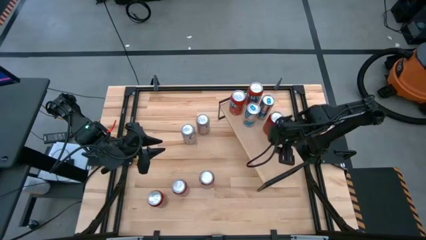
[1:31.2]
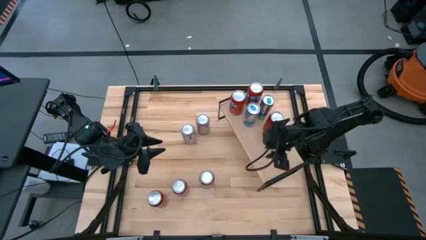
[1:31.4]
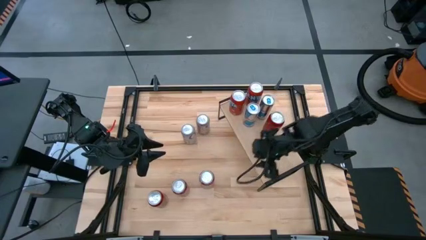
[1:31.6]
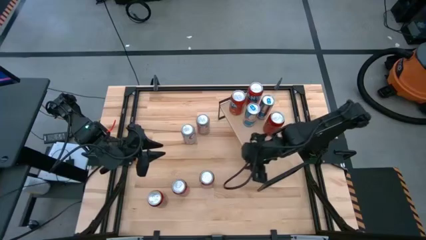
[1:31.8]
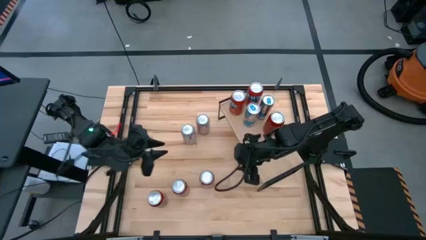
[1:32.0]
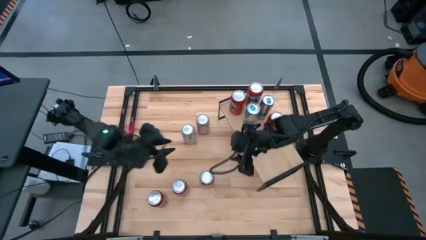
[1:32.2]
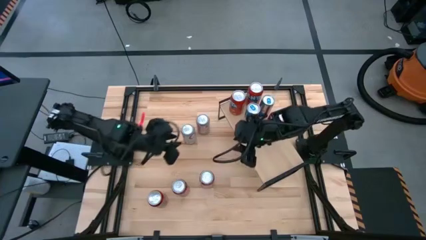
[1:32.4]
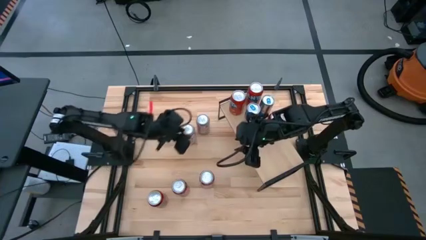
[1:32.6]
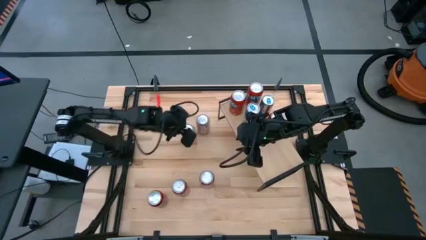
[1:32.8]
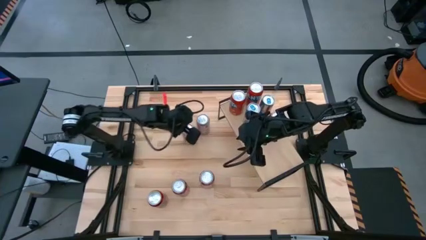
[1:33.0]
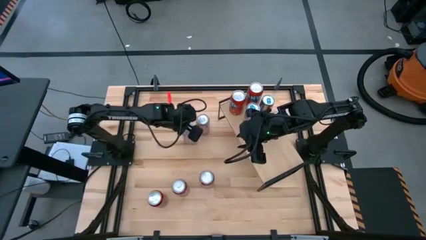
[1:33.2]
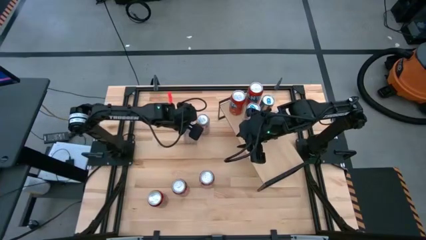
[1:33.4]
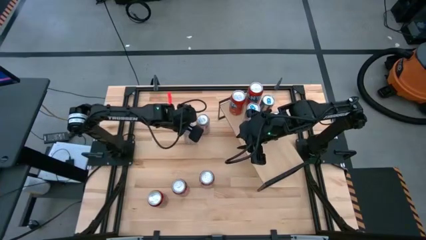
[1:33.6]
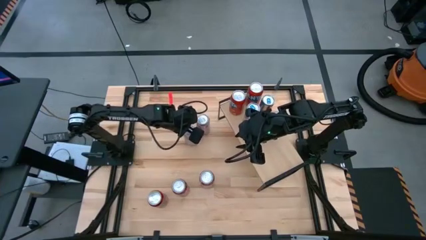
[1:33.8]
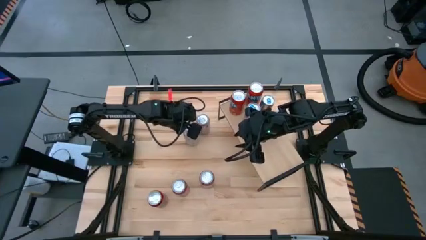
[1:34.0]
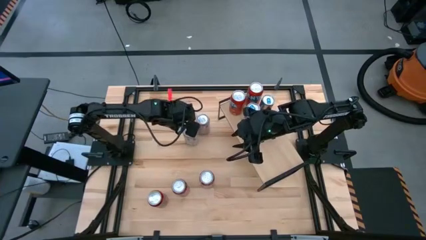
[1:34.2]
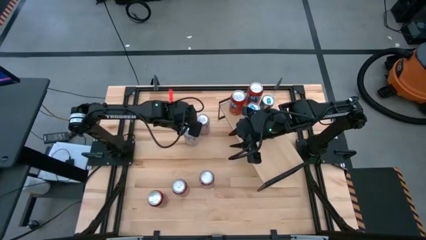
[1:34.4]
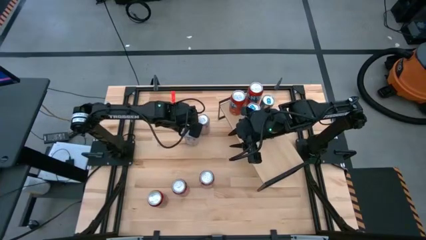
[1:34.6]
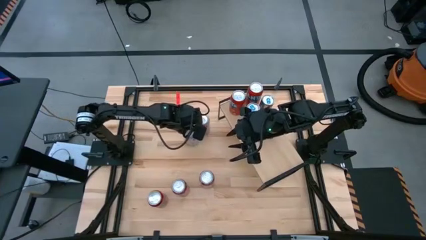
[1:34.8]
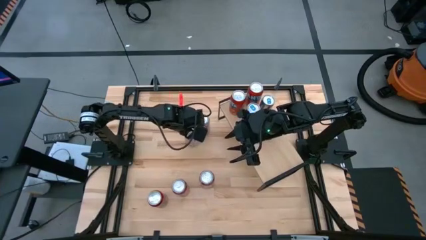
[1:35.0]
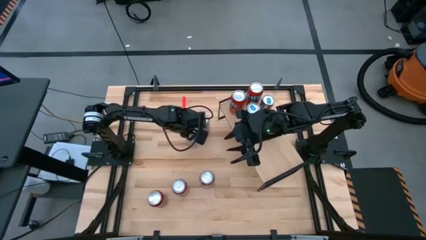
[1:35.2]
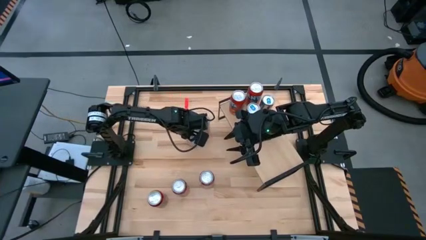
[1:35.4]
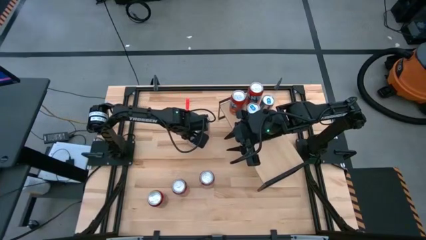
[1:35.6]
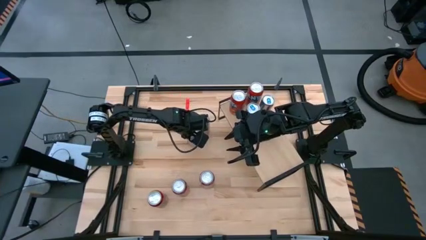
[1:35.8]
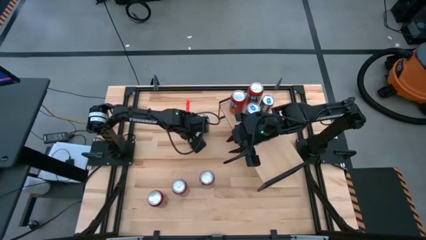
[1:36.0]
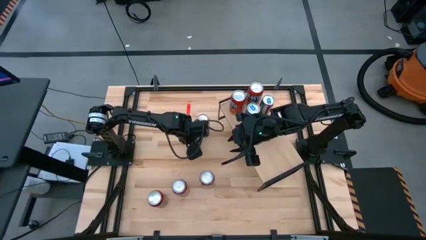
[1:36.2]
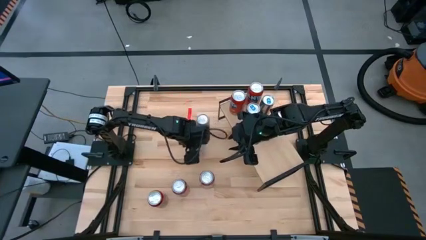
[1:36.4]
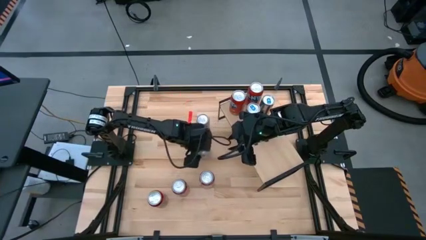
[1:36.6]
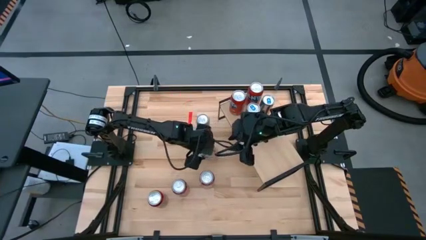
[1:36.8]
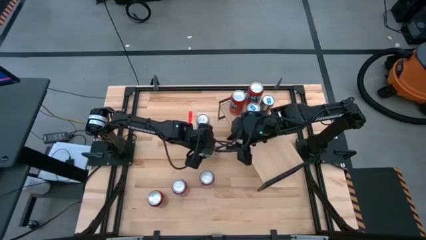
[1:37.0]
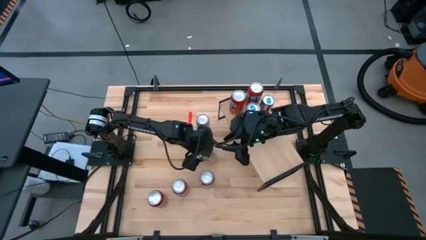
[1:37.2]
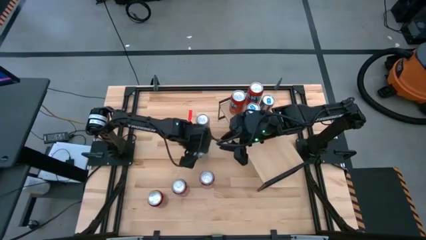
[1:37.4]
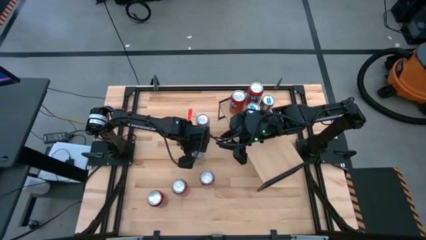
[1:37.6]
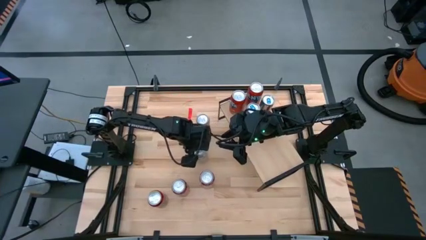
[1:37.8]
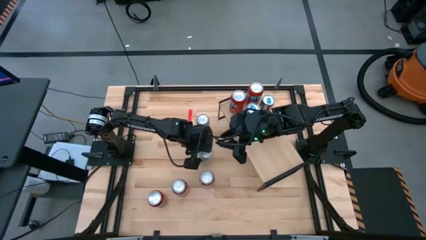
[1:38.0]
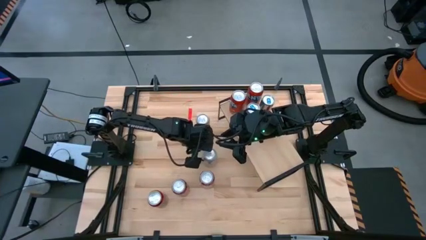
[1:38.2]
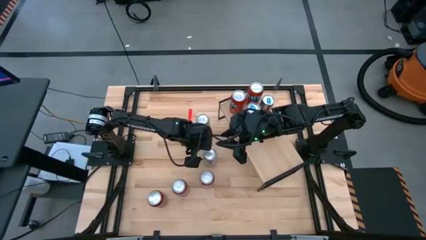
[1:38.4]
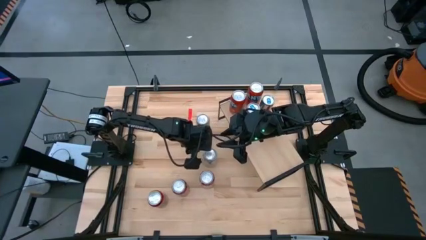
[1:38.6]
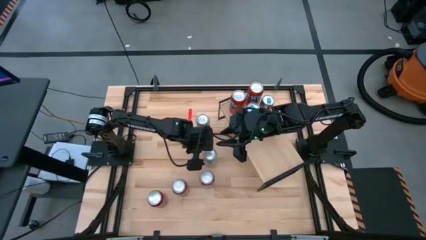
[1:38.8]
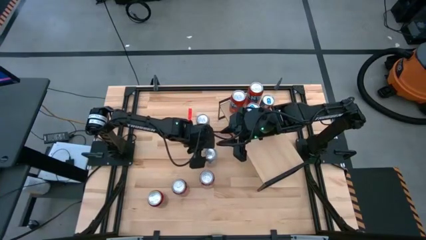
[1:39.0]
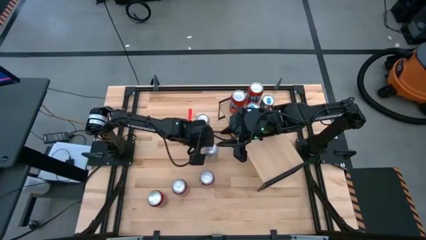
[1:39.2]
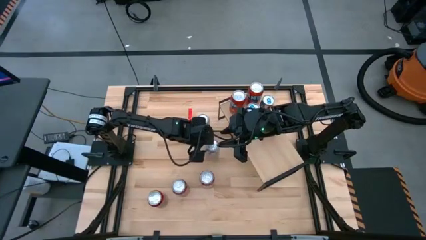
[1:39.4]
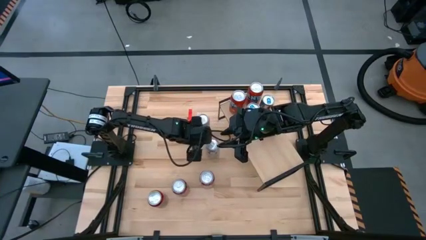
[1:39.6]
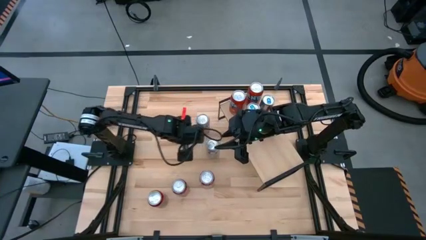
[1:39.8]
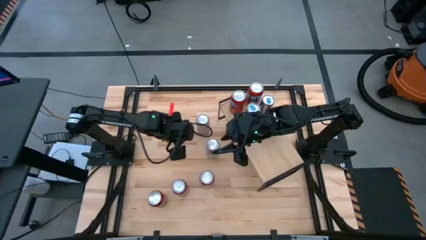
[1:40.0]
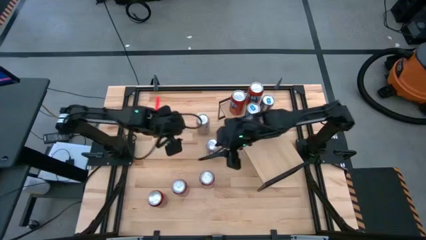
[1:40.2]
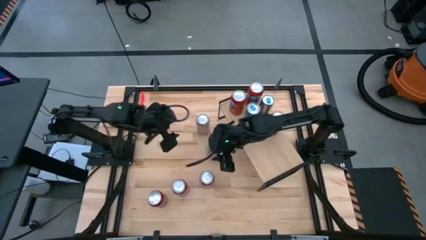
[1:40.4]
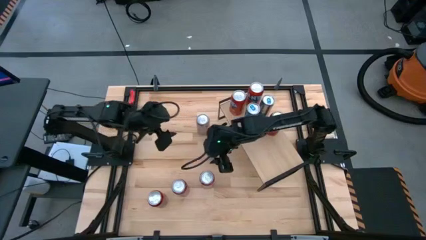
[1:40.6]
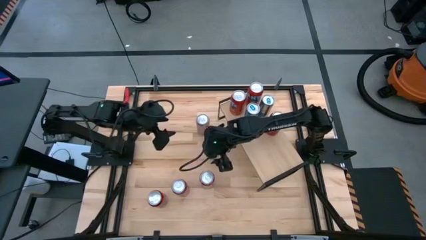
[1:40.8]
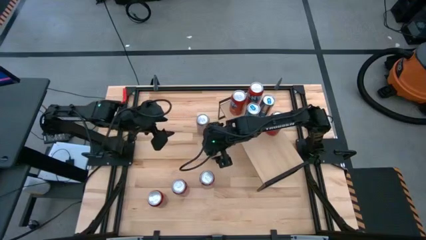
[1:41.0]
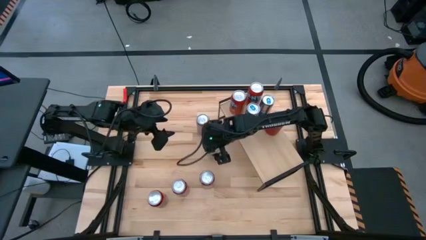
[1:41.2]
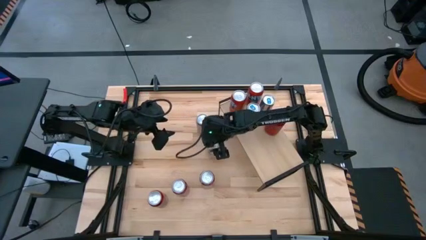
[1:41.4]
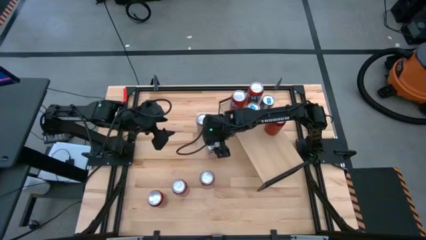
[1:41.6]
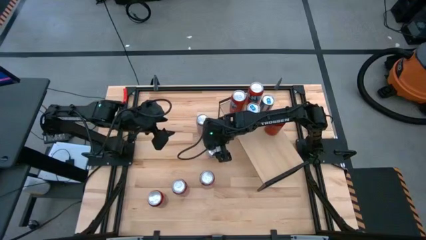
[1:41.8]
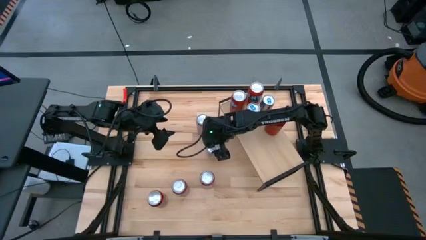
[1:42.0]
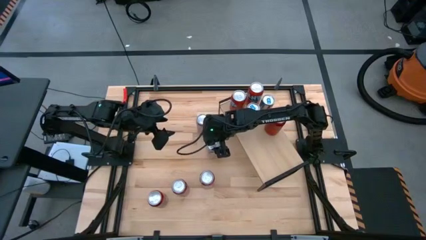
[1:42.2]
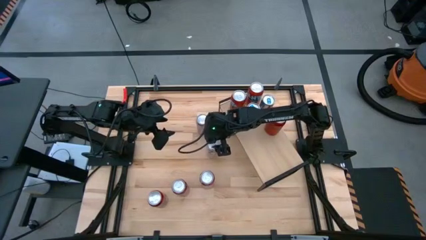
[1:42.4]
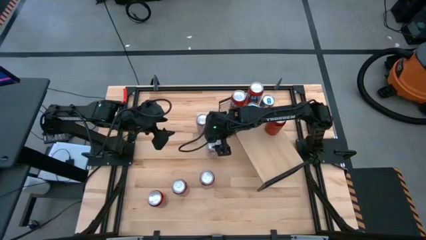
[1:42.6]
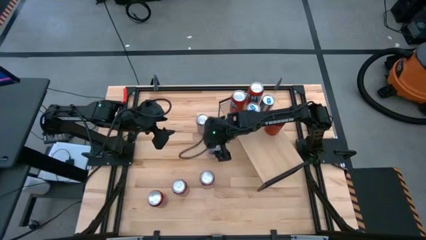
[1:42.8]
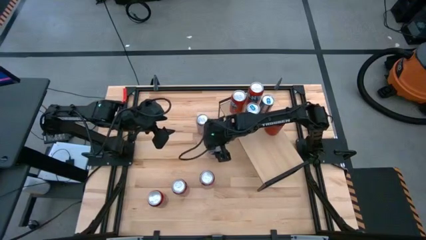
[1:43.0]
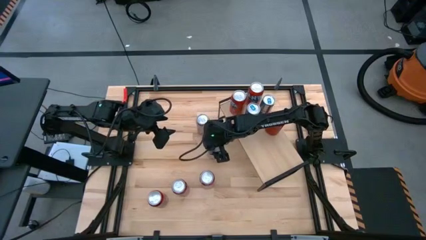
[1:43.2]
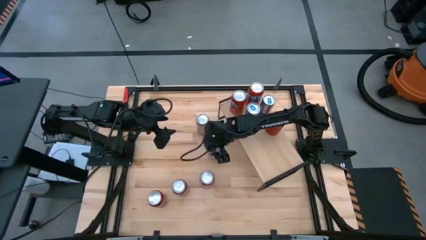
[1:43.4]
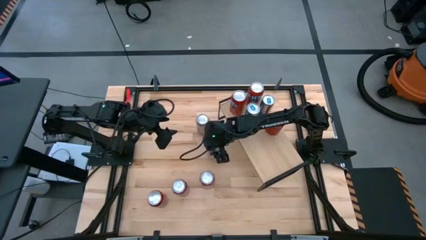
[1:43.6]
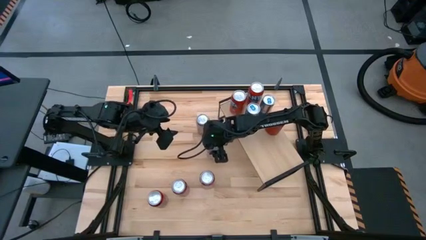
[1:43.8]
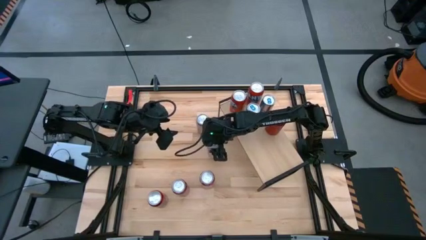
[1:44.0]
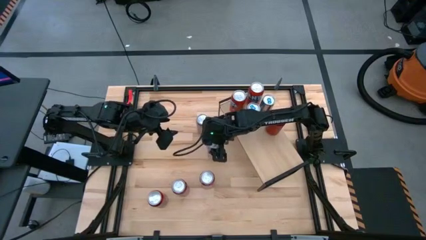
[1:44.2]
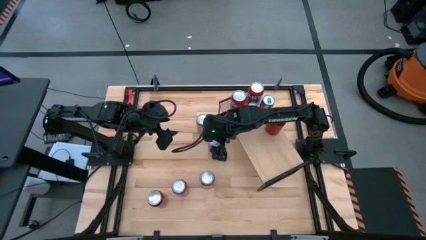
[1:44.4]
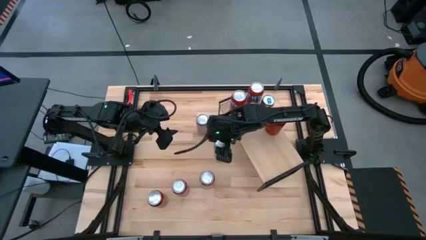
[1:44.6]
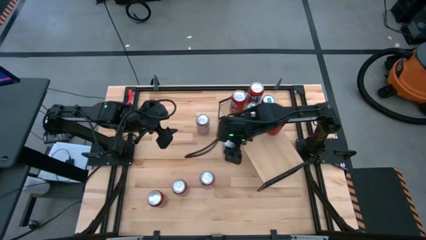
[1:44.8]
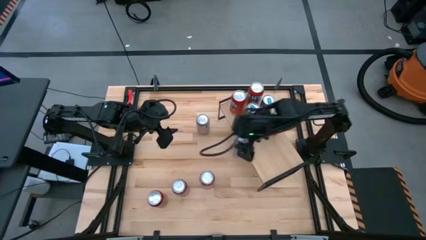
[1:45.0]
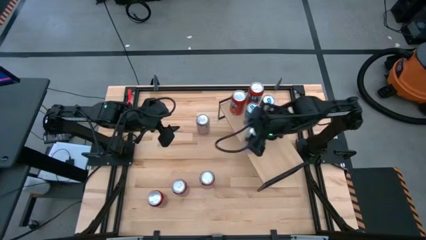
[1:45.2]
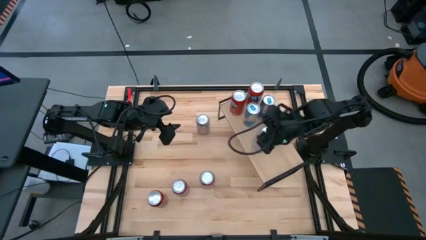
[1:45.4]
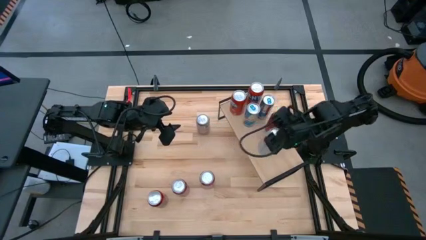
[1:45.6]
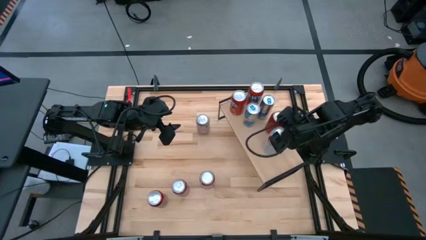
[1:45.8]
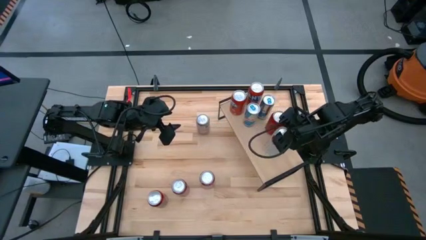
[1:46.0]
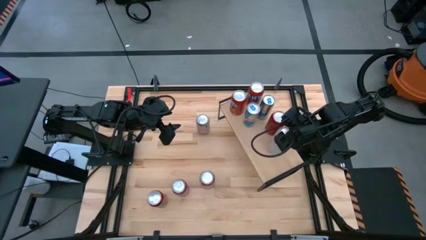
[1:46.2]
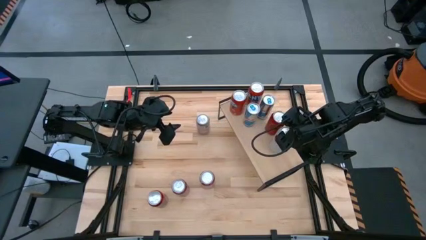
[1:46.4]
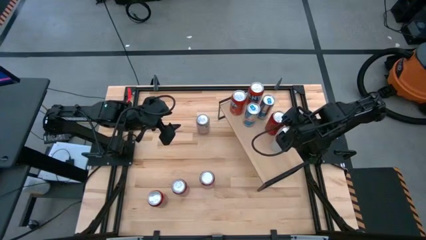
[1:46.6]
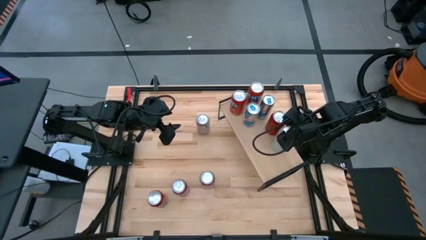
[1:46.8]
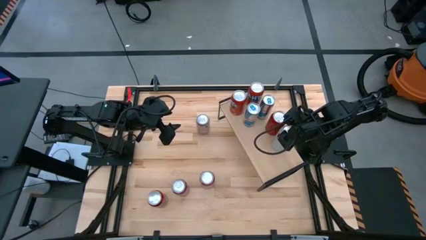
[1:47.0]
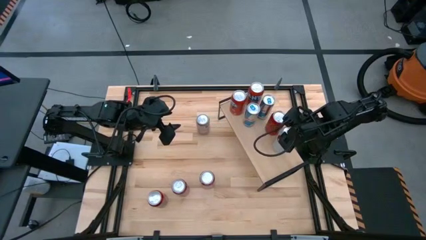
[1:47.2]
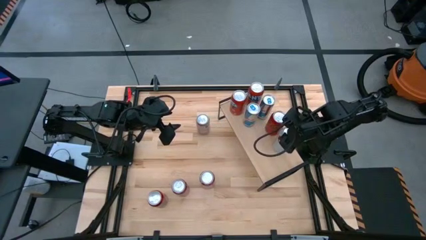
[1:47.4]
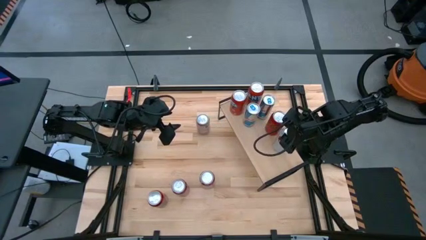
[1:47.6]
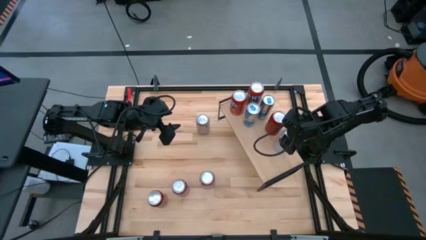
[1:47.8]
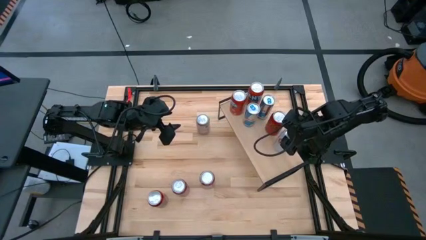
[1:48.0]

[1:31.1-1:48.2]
Task: Place canned beverage on shelf
Put the bottom white soda can on the shelf
